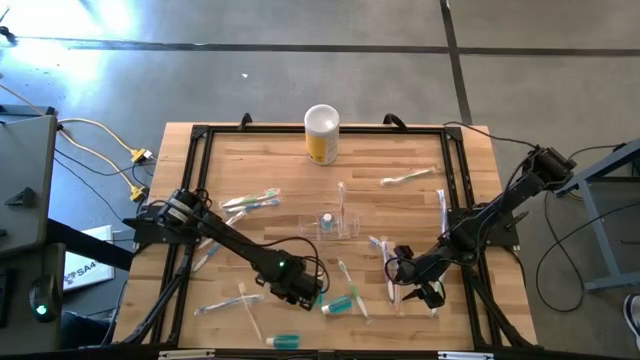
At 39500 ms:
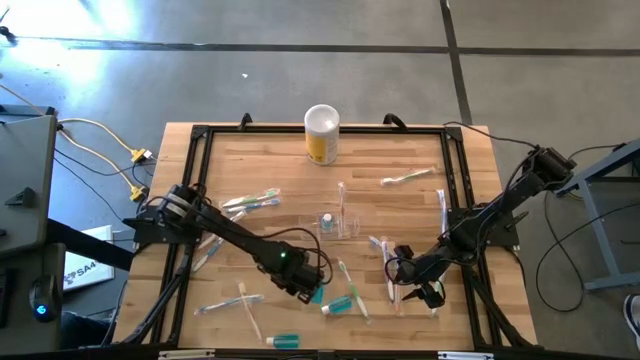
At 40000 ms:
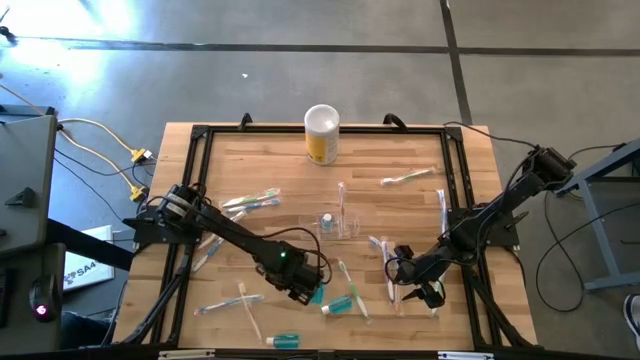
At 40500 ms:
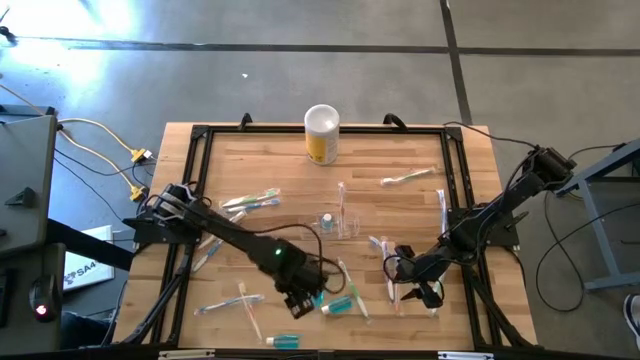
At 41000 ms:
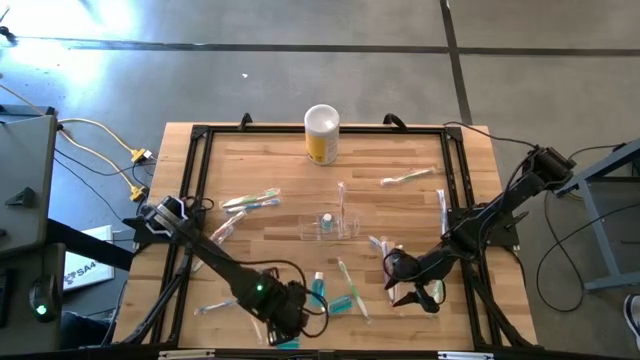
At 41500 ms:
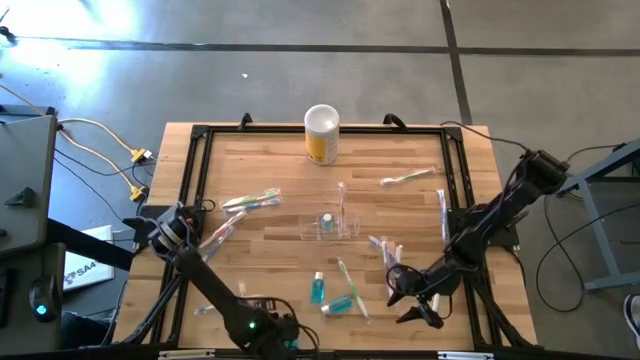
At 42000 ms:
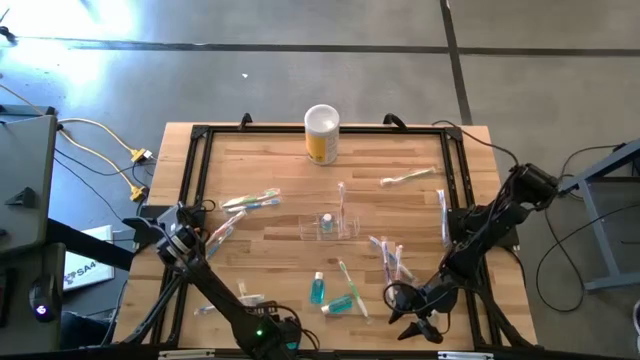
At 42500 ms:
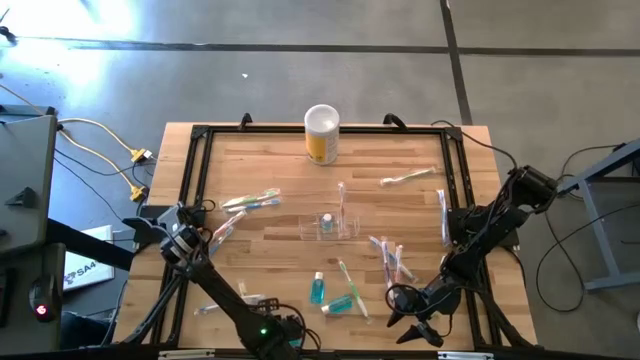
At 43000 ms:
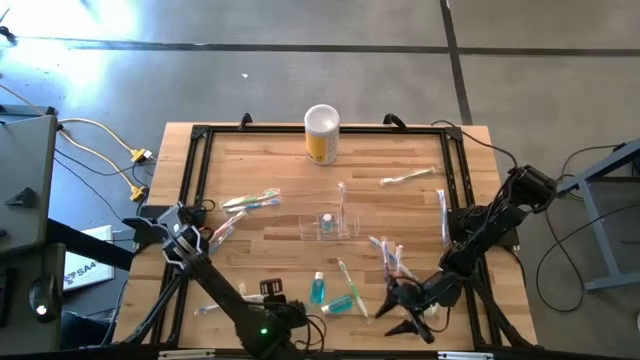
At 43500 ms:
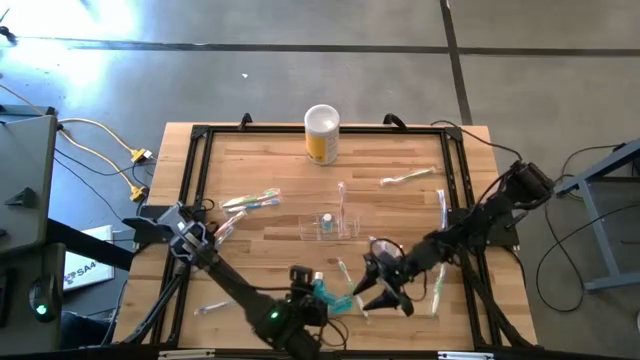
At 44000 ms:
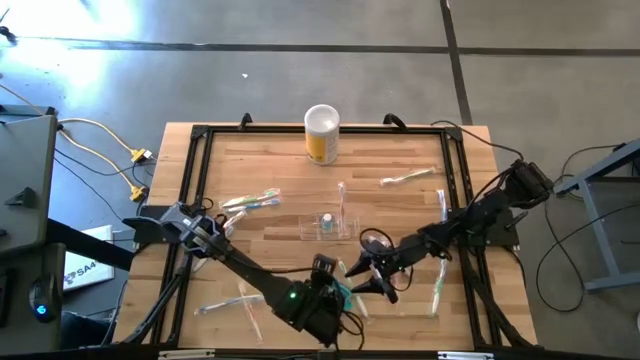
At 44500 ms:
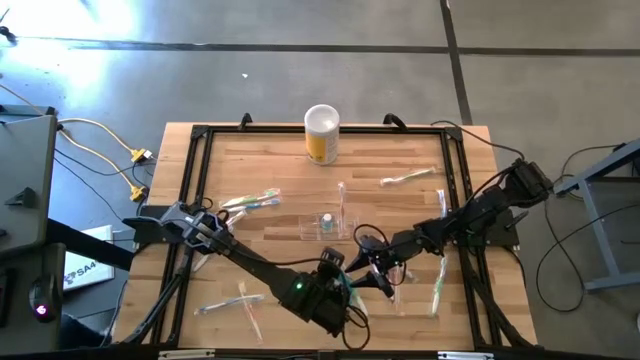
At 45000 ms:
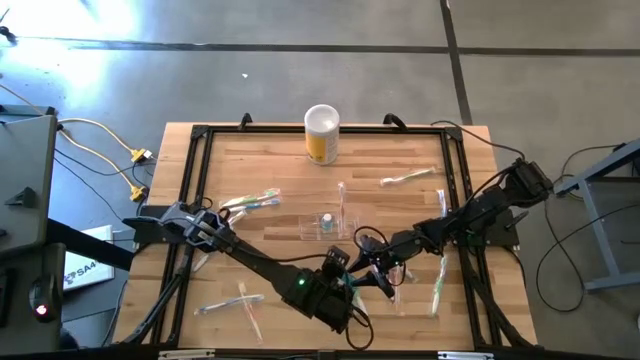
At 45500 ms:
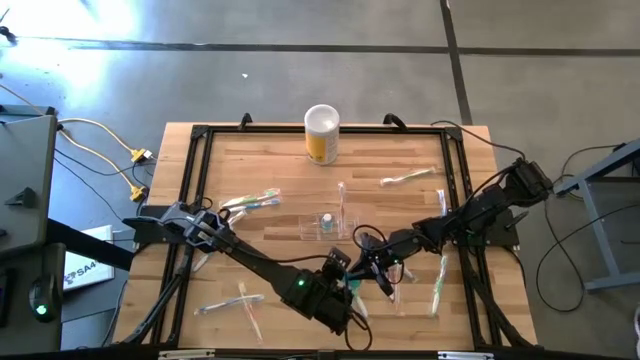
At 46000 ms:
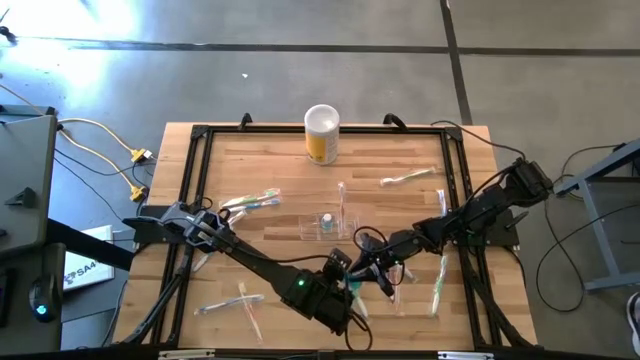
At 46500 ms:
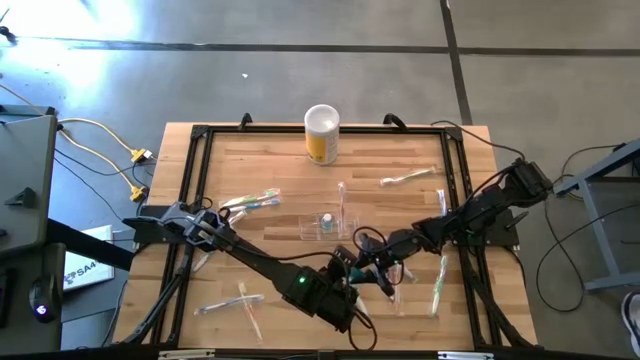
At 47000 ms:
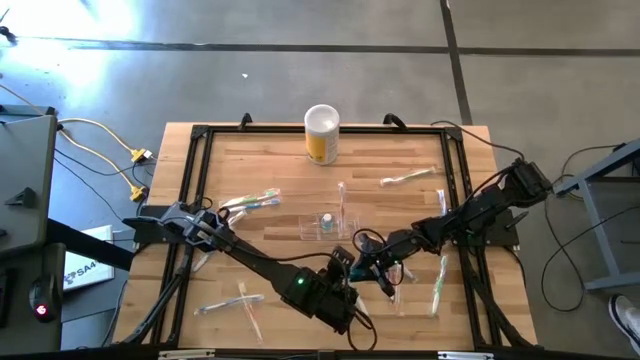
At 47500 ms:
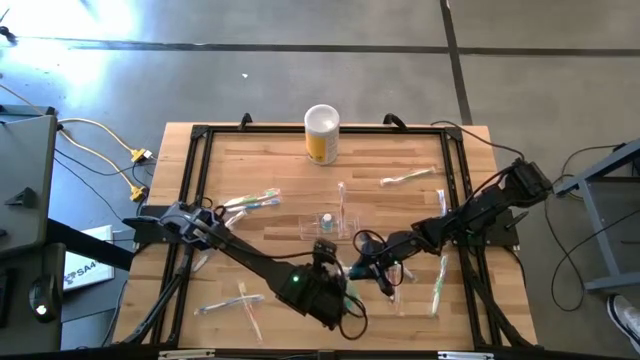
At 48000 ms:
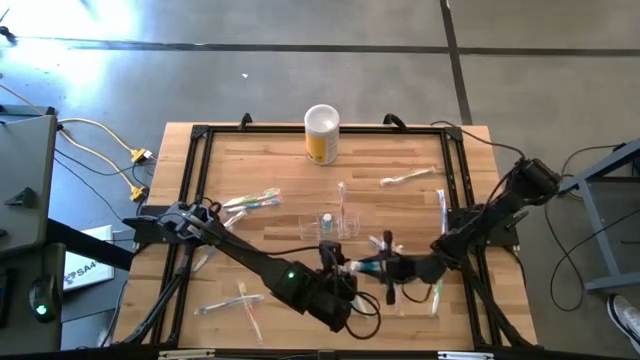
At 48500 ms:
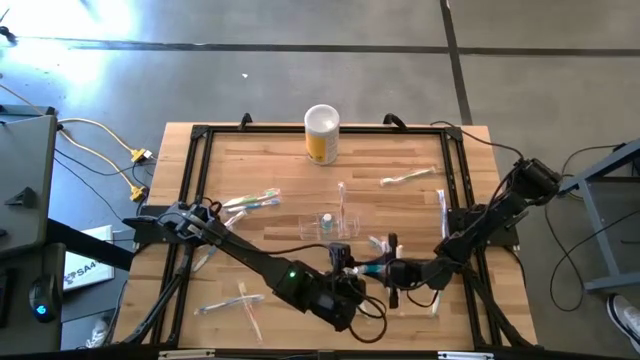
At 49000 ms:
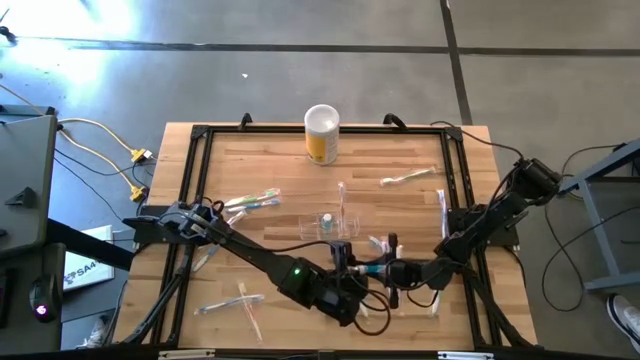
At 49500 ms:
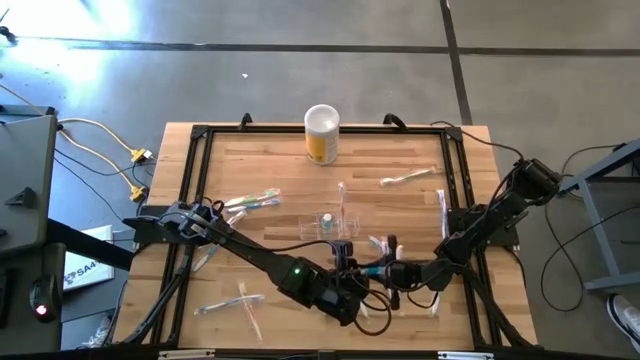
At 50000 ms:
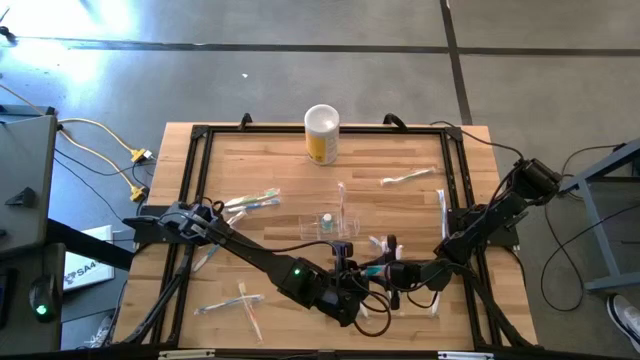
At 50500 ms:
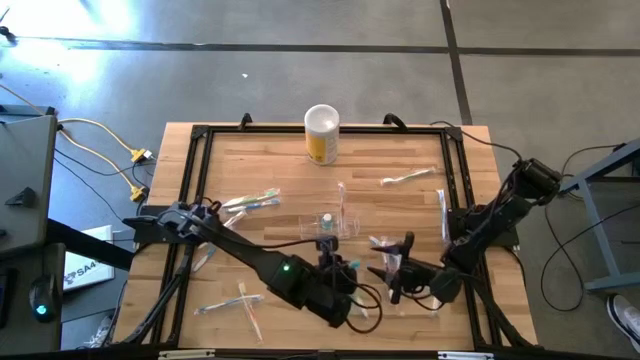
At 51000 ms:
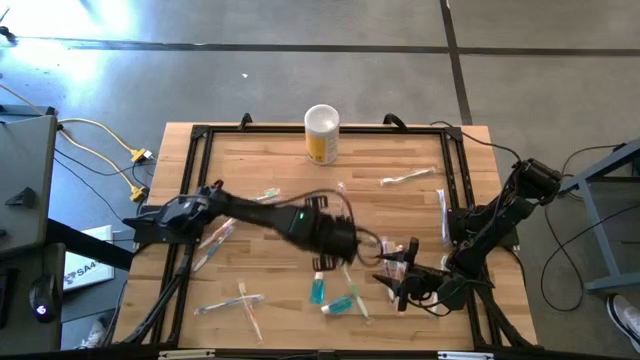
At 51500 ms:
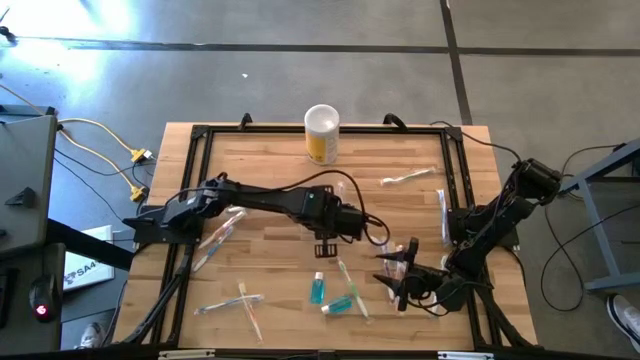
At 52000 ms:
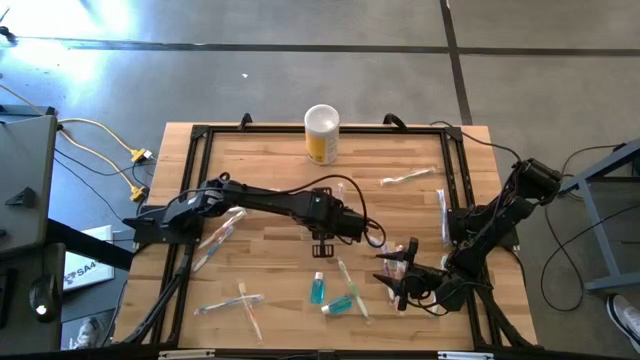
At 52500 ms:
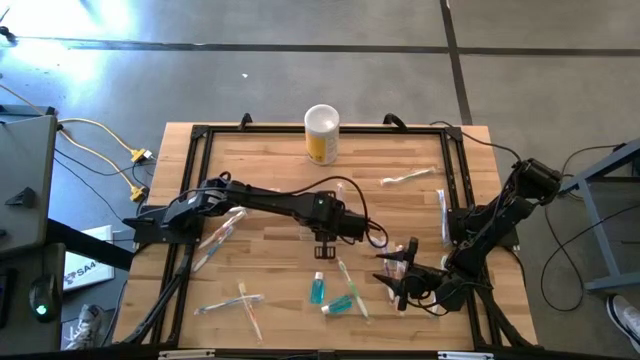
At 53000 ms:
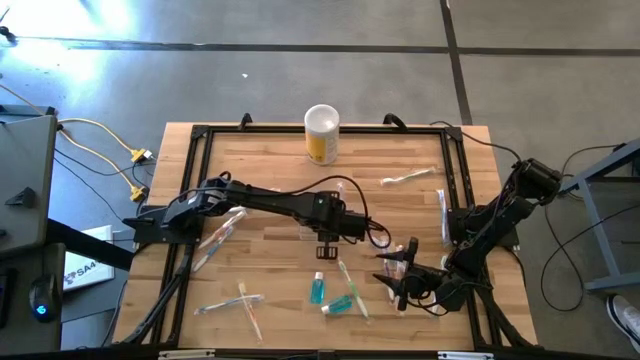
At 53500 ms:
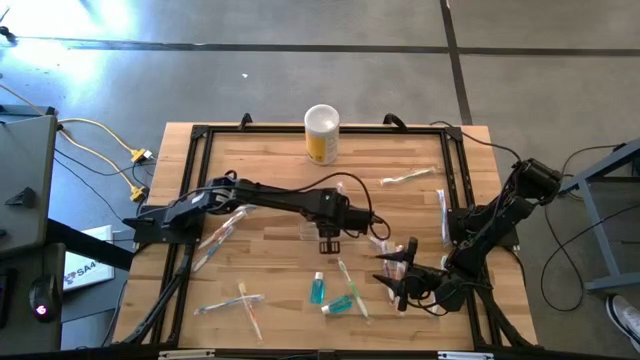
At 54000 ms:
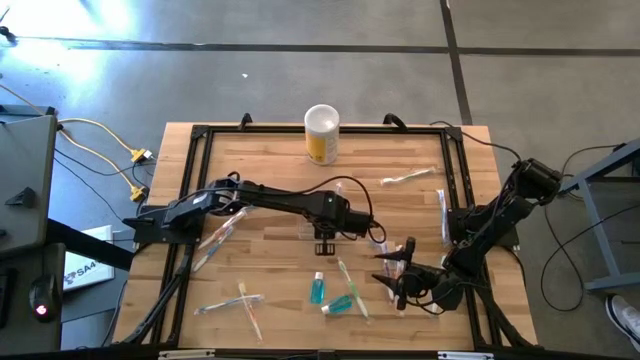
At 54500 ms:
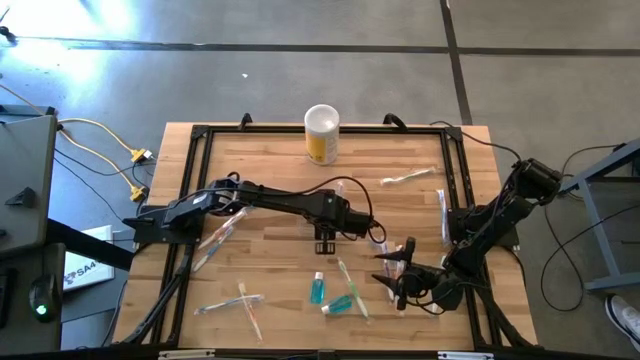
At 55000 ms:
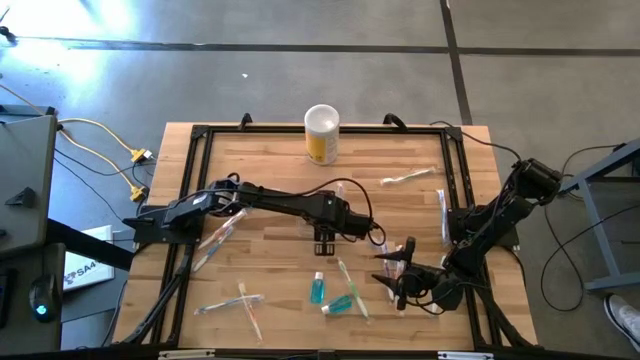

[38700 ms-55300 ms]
Task: Pick & Place toothbrushing station
Put the blue mouthwash into the middle part of the transparent organizer

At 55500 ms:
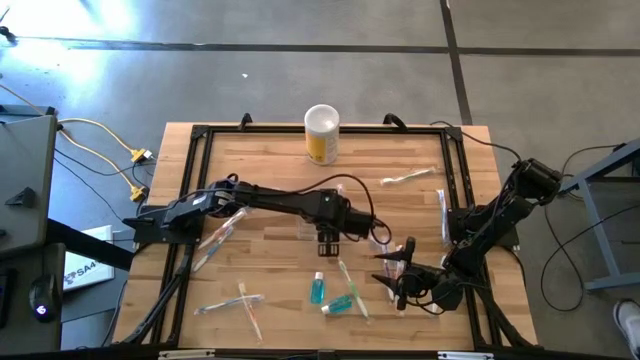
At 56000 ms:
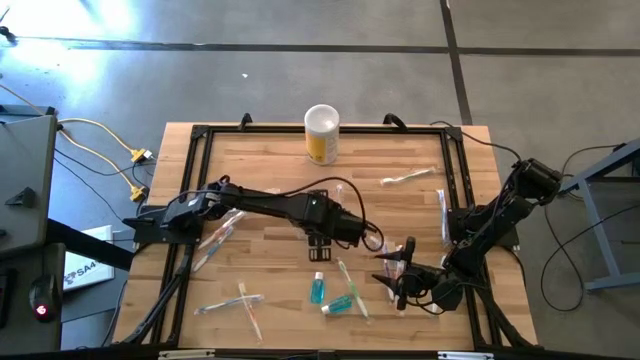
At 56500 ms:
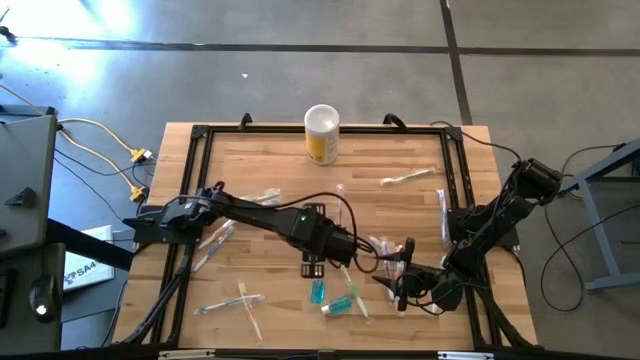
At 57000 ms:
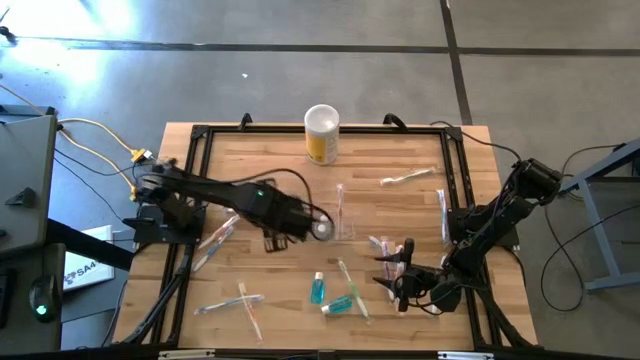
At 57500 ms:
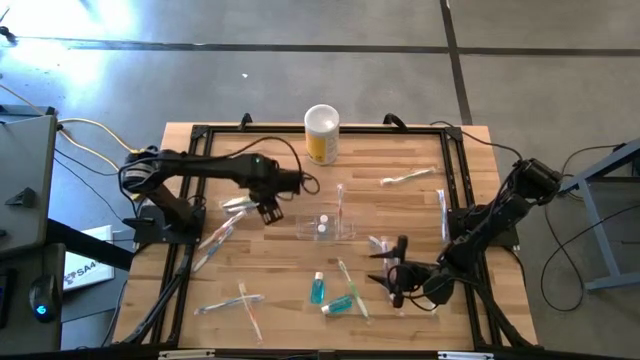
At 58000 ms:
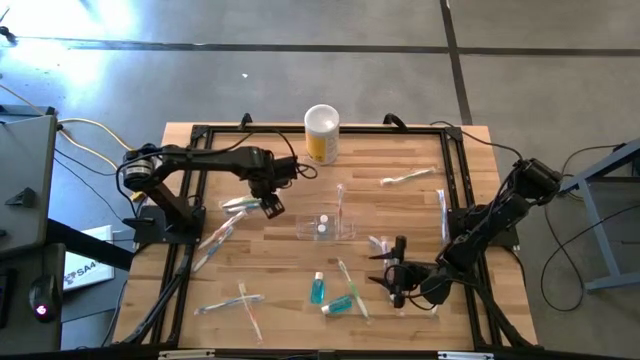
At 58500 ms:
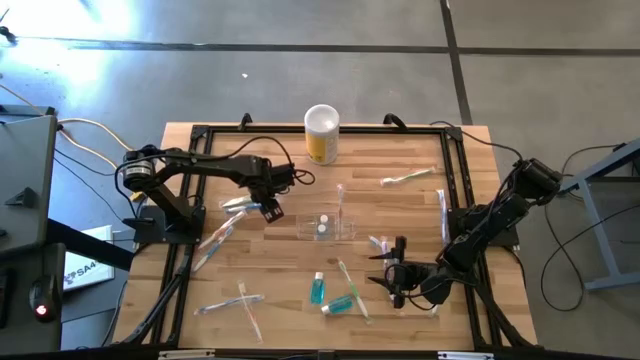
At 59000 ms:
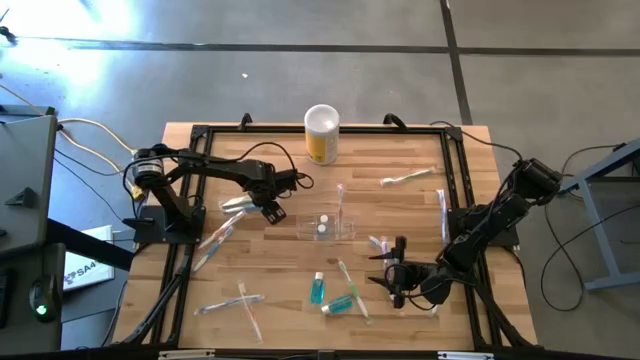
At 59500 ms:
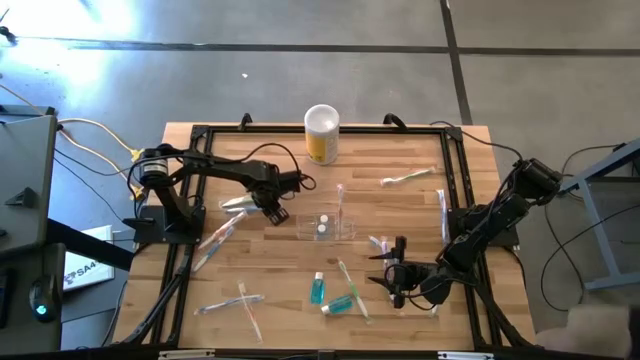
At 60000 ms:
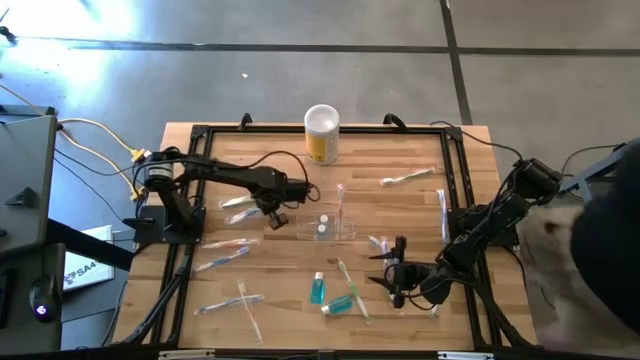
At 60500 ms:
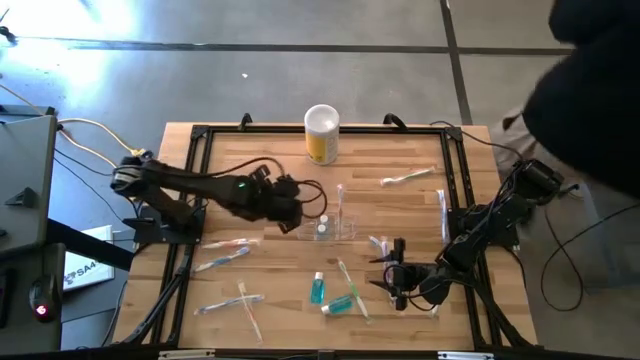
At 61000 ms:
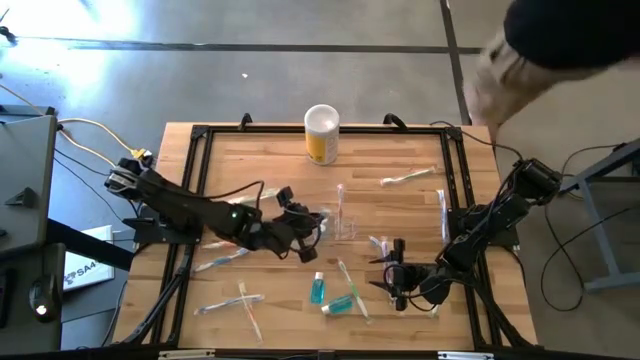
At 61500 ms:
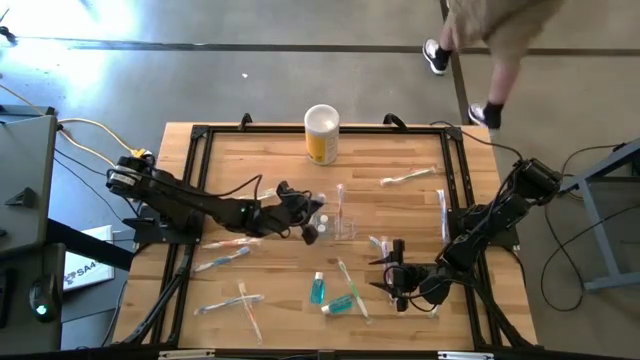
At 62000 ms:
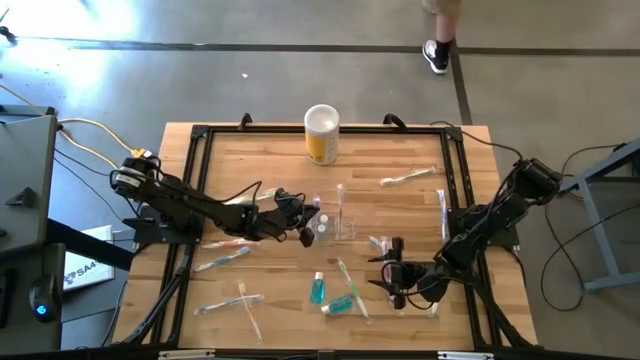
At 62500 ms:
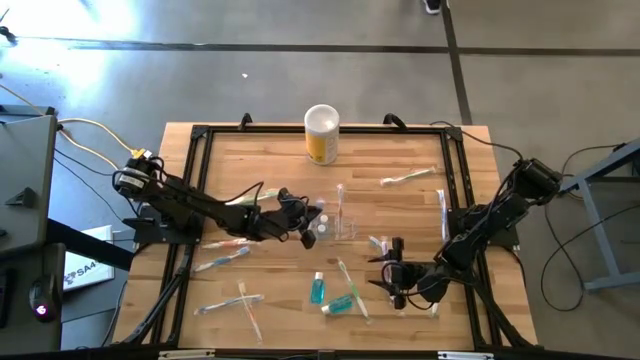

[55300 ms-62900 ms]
Put the blue toothbrush into the left part of the transparent organizer
